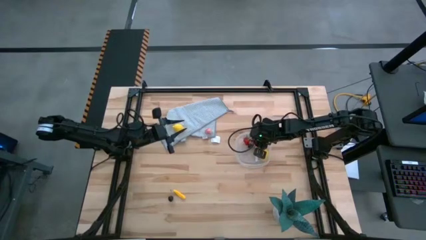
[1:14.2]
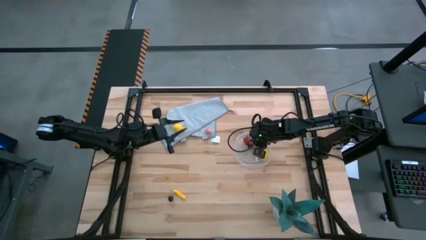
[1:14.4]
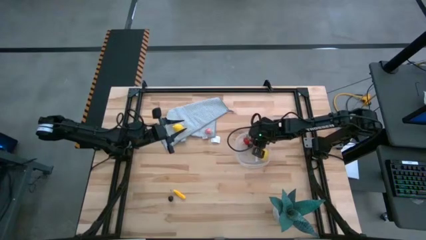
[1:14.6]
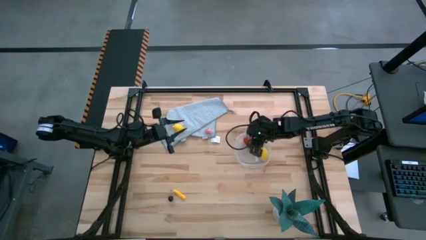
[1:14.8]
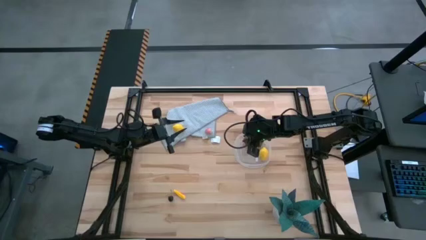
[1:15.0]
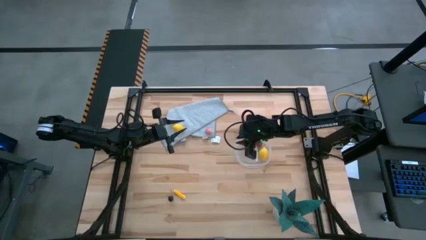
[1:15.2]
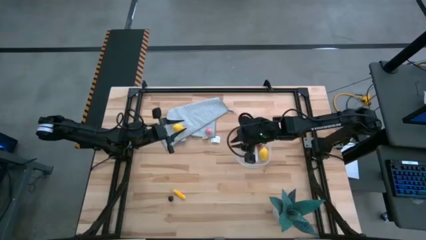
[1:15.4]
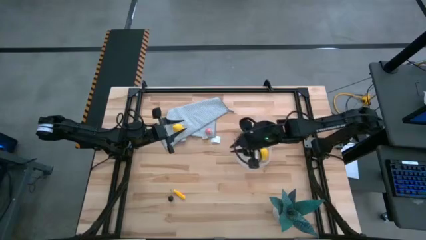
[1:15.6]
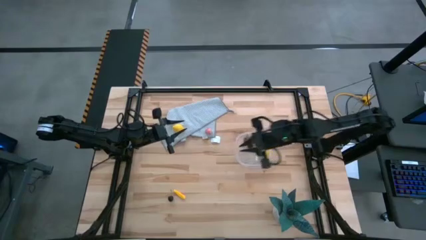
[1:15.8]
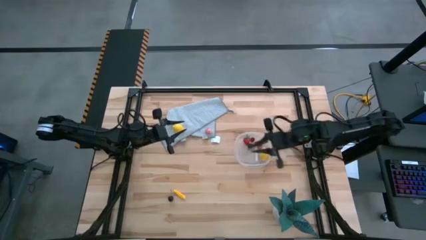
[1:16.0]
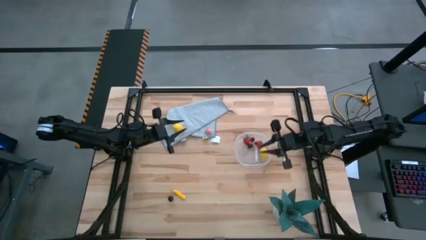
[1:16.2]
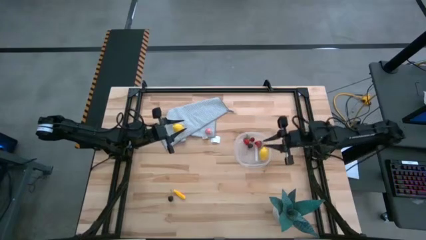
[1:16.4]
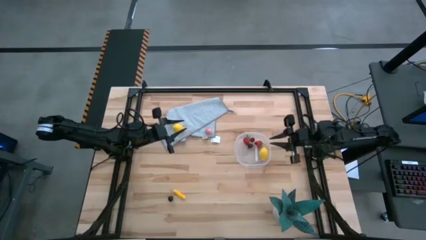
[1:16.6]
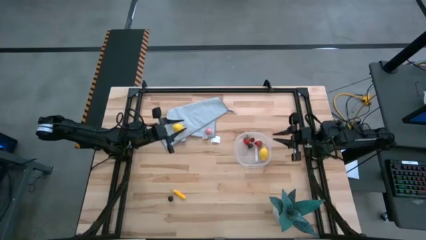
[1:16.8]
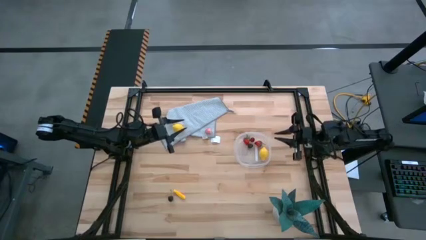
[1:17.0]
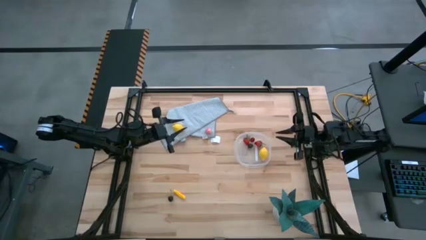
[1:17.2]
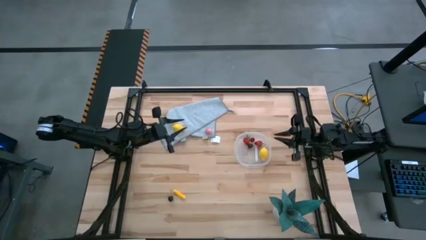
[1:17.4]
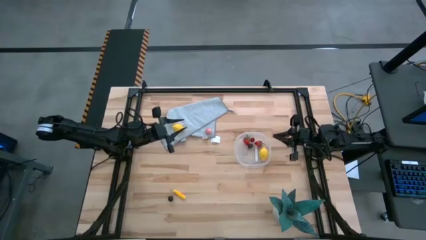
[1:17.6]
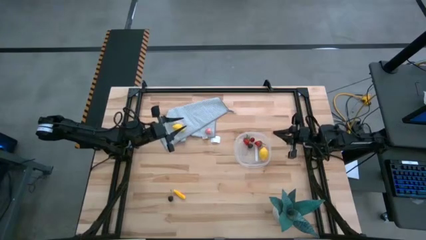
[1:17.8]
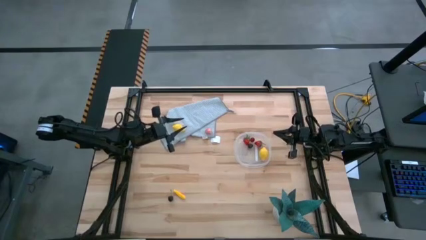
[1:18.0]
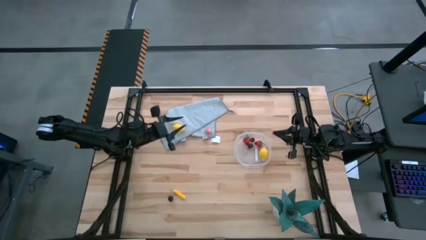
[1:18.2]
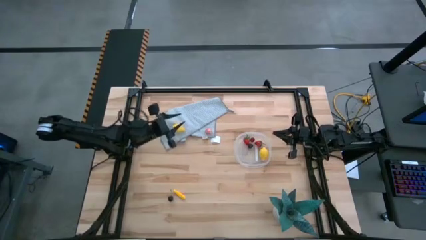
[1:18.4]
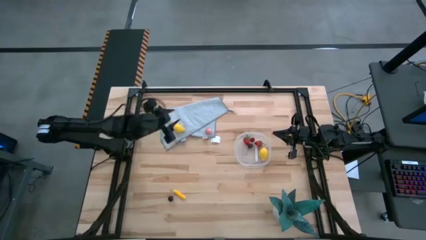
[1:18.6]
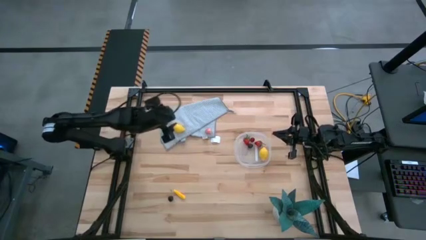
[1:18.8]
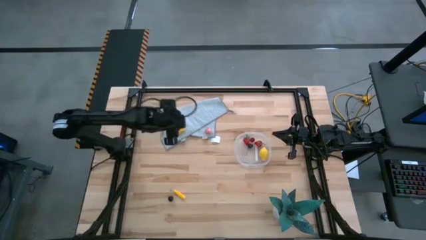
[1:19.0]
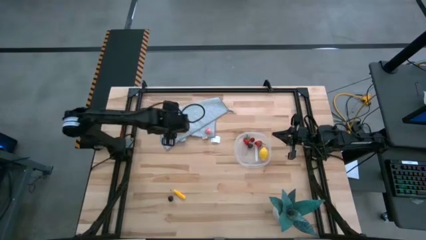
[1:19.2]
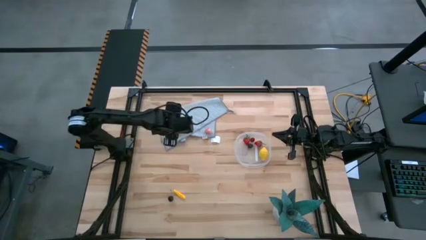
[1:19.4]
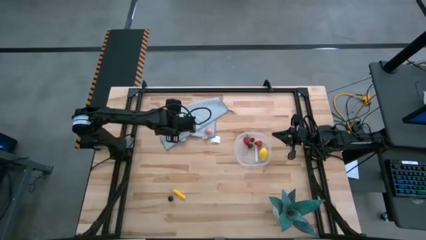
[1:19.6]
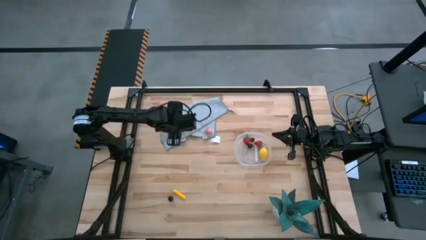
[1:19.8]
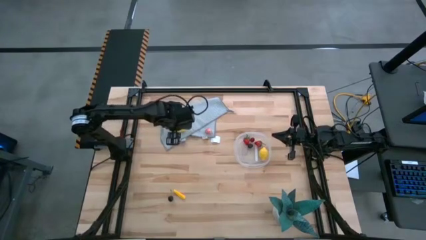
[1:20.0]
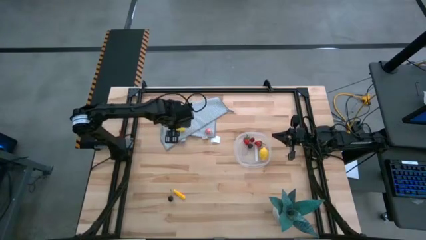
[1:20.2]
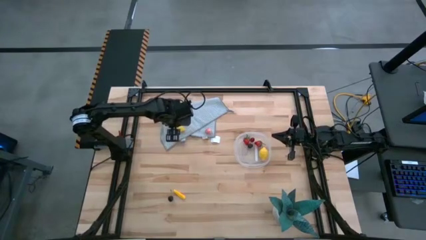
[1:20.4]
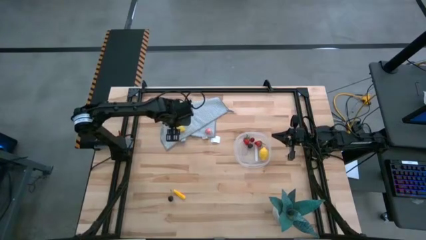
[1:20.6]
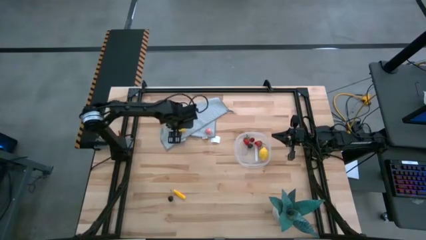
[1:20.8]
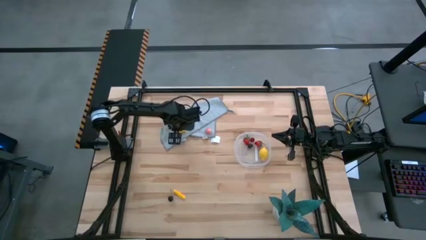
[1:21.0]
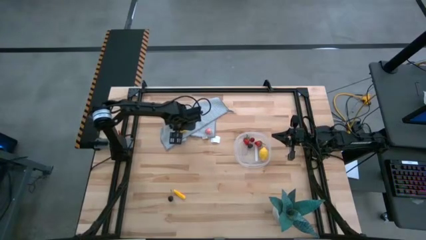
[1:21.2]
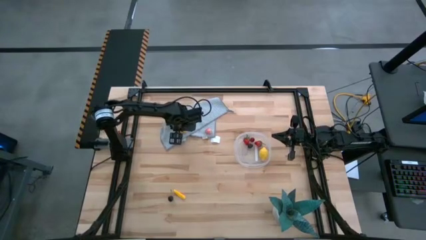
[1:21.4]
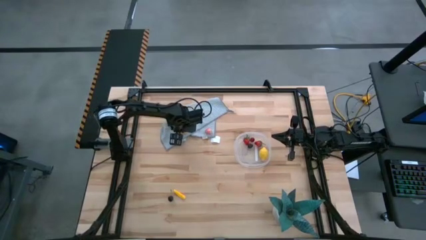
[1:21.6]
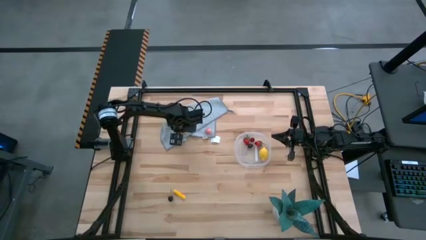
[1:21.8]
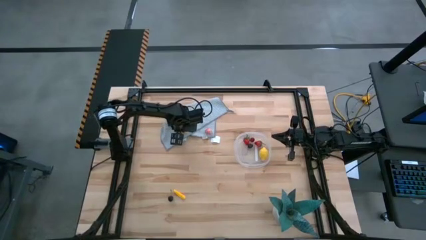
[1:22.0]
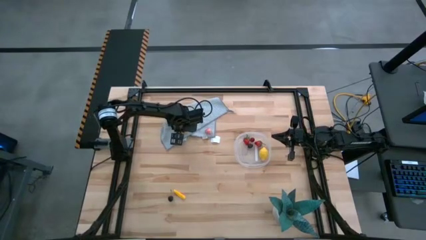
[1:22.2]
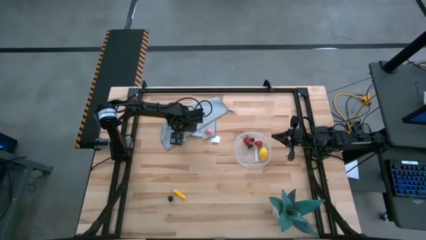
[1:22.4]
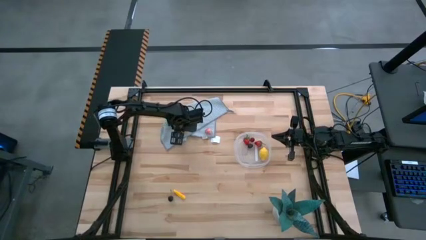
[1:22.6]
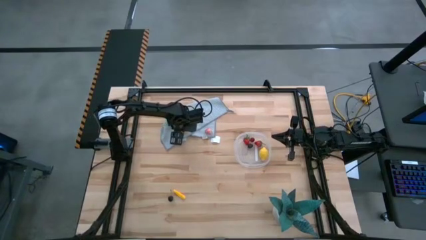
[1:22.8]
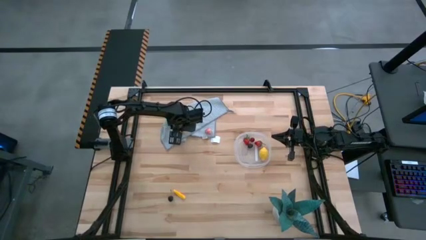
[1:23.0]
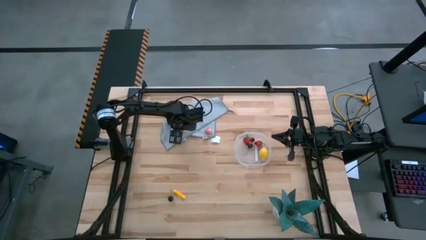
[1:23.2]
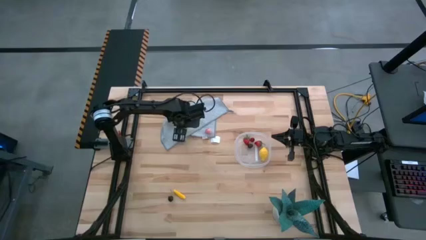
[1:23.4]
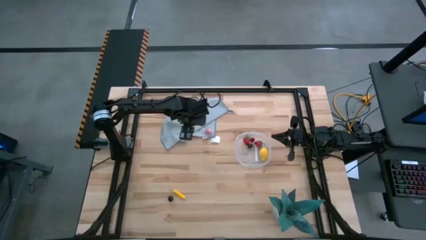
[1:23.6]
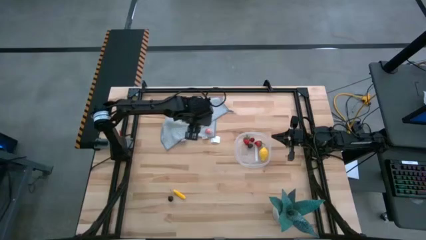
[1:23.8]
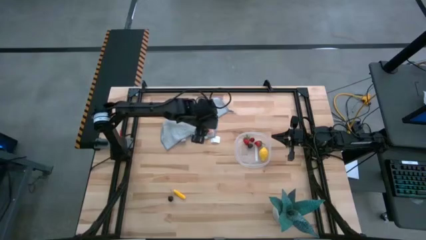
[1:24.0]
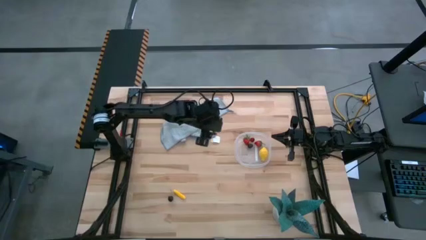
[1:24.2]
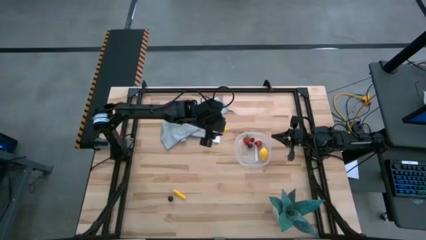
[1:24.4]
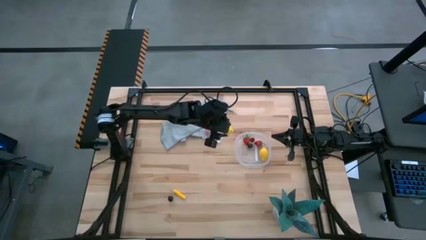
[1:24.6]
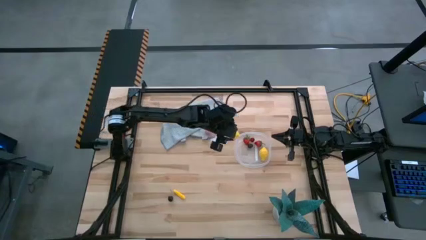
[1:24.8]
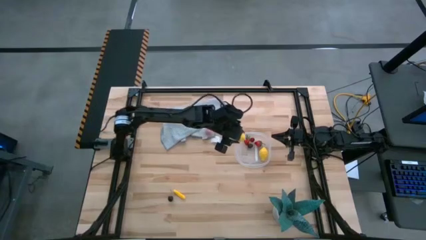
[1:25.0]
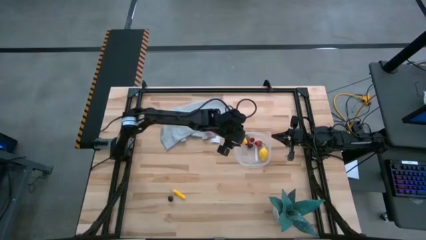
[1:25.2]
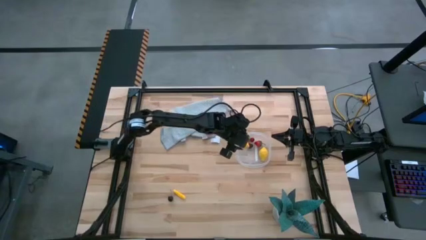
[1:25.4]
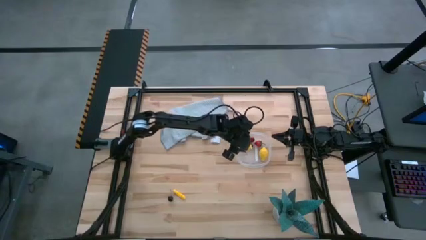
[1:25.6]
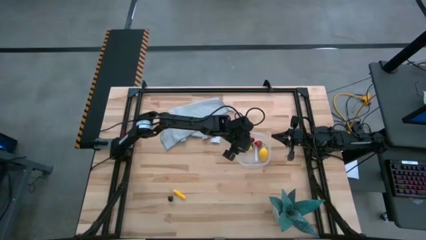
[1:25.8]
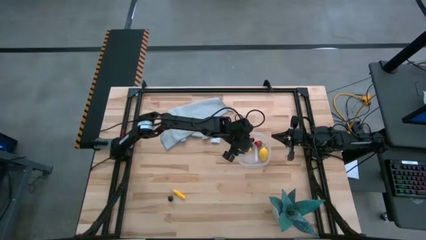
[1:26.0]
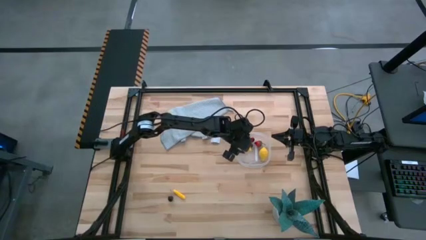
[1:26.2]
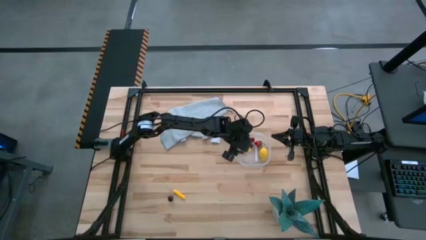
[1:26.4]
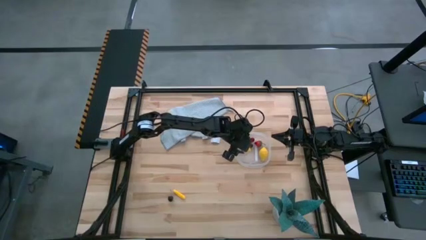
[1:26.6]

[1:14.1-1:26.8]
Task: Pick and placing Produce into tupperware
Put the lemon into the transparent container
